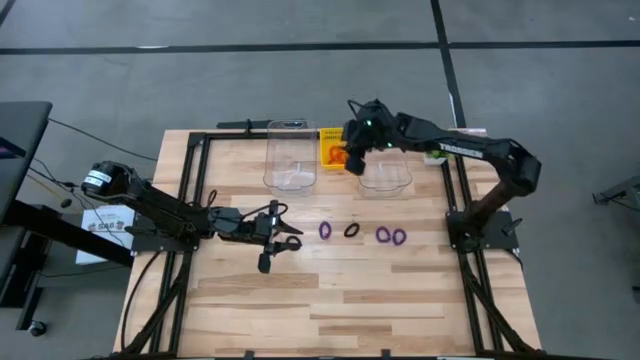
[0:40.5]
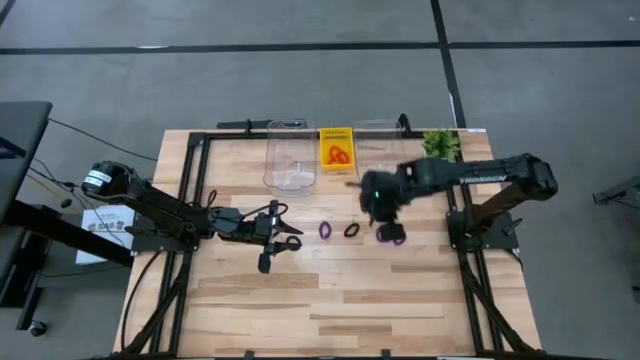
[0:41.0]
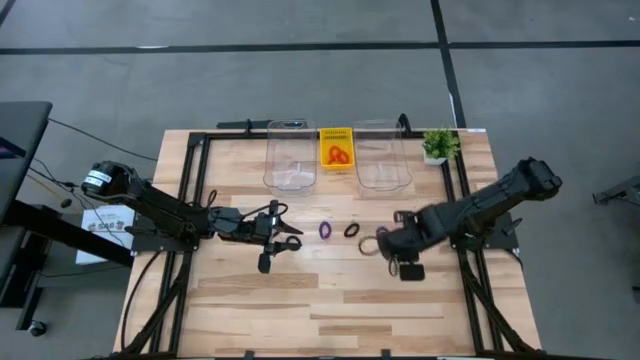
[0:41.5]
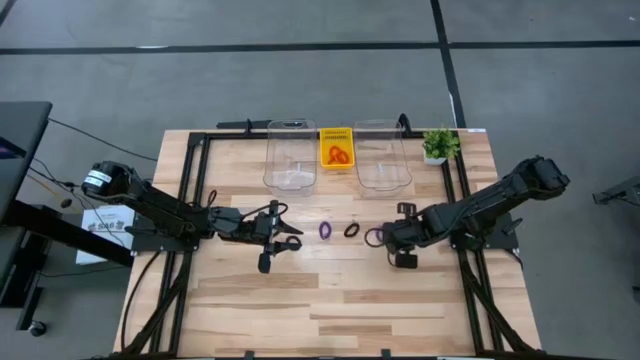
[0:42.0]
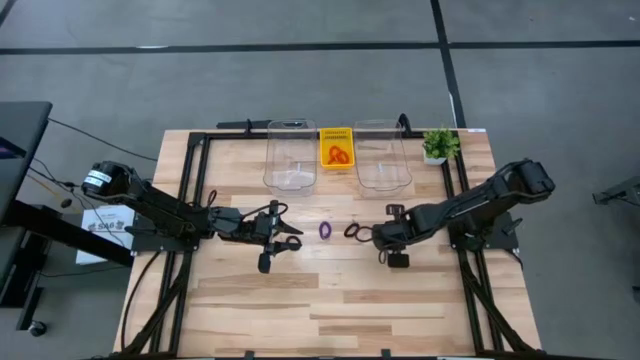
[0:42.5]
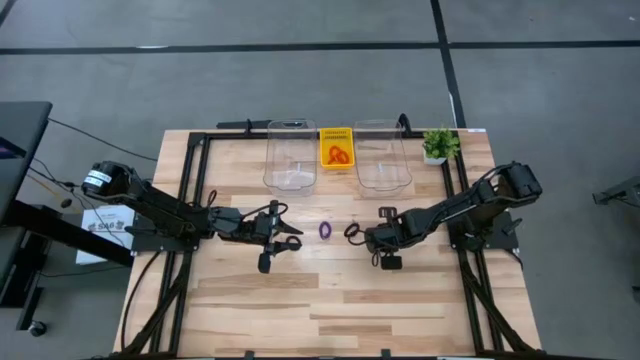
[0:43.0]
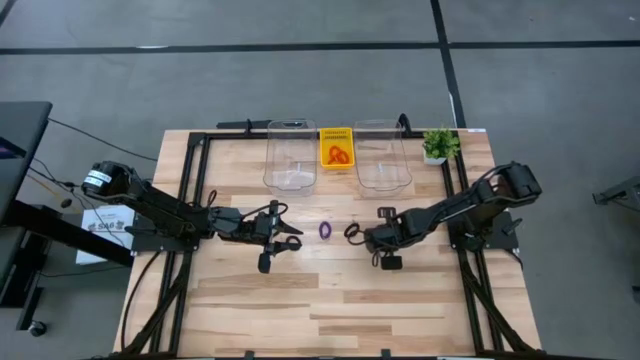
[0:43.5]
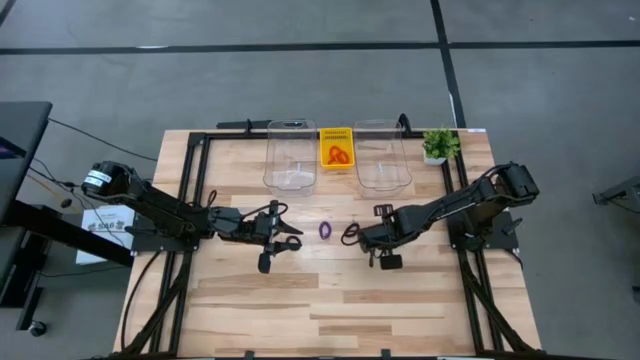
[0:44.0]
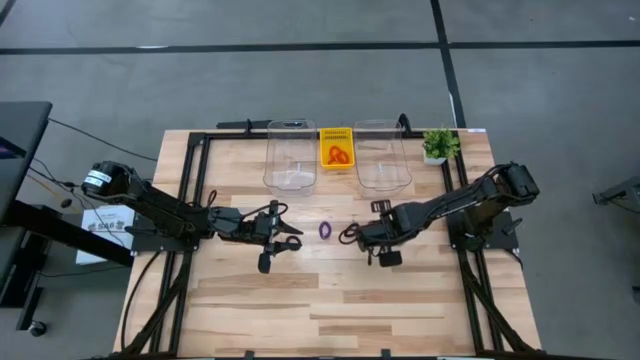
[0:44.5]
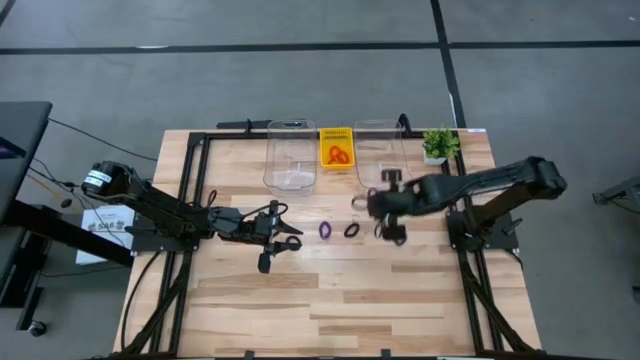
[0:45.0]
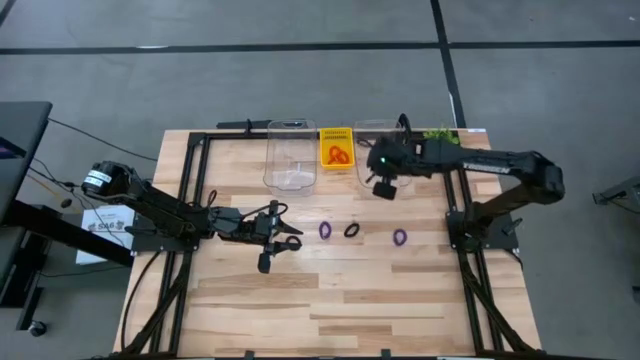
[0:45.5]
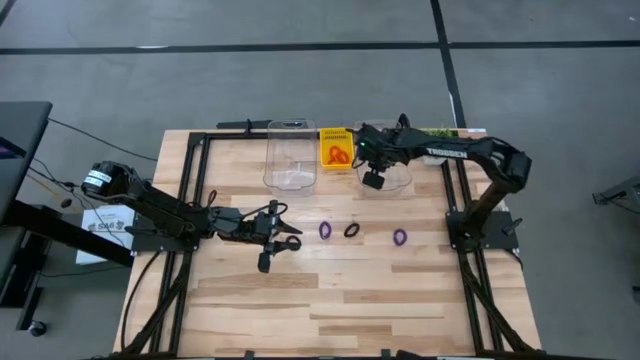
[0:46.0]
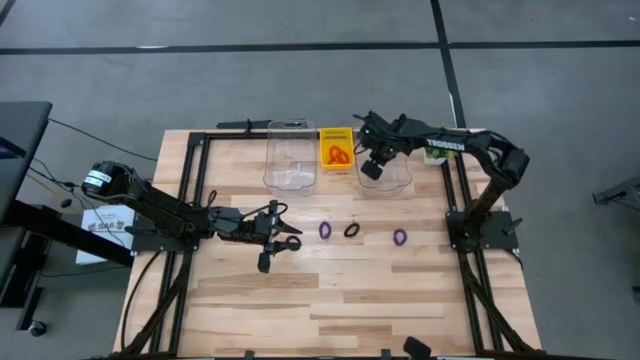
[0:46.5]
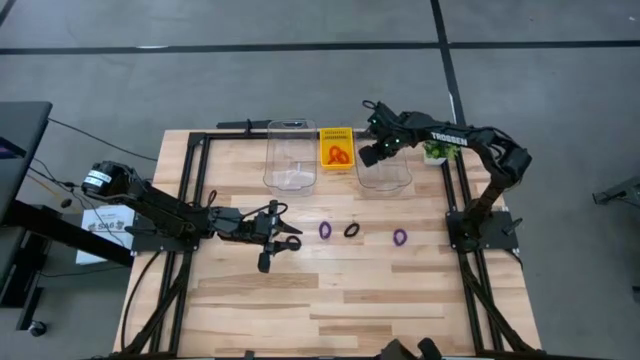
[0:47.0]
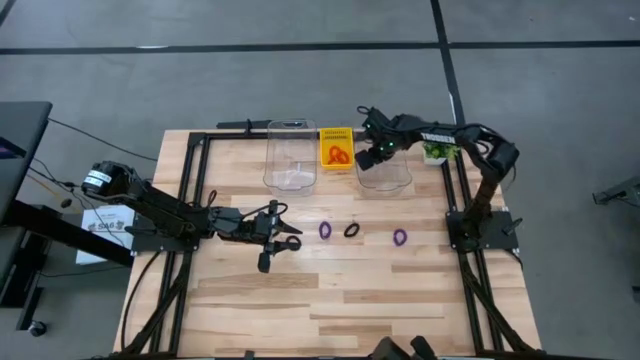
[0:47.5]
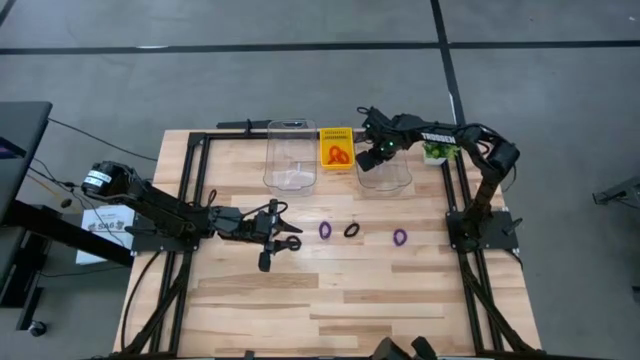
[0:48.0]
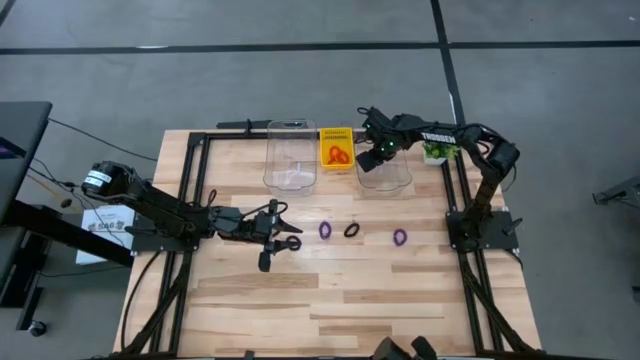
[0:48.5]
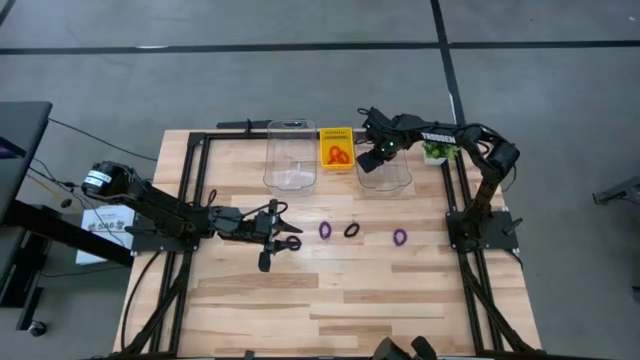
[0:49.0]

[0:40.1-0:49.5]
Task: Sort spring keychains
Put the middle purple spring keychain into the right transparent bin

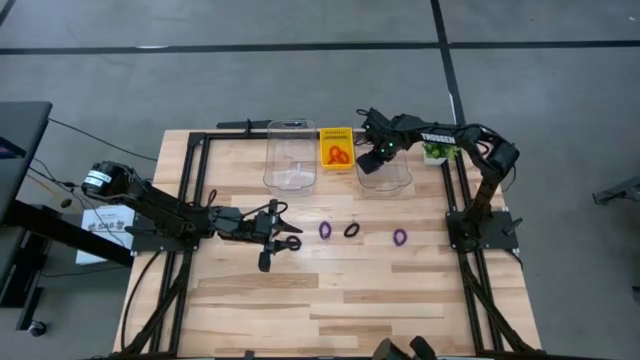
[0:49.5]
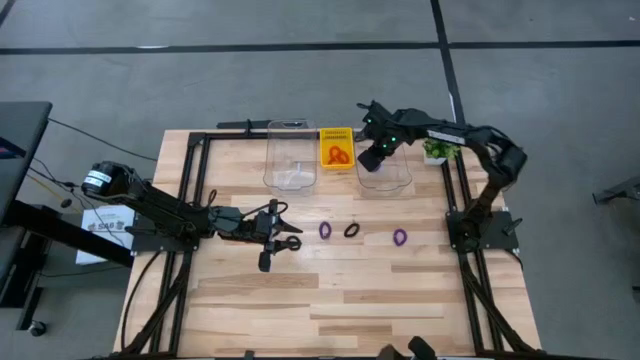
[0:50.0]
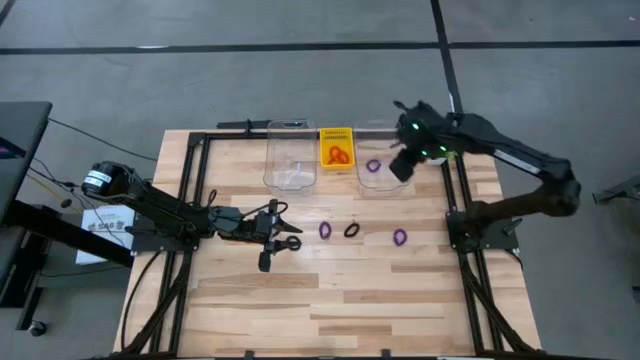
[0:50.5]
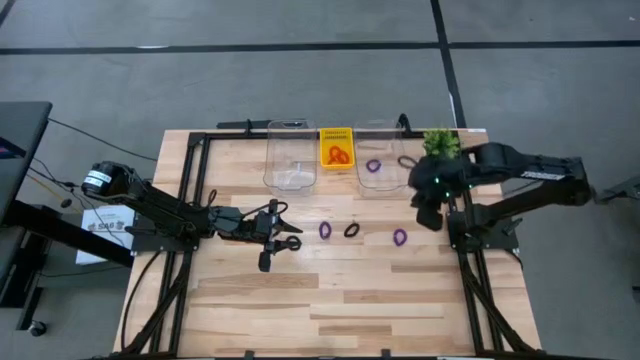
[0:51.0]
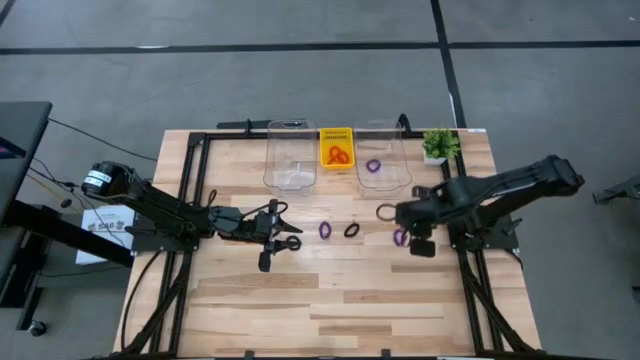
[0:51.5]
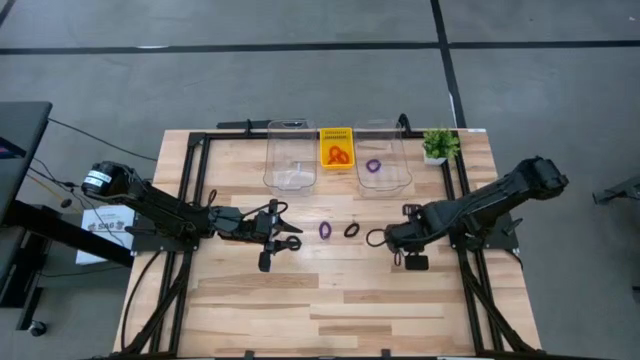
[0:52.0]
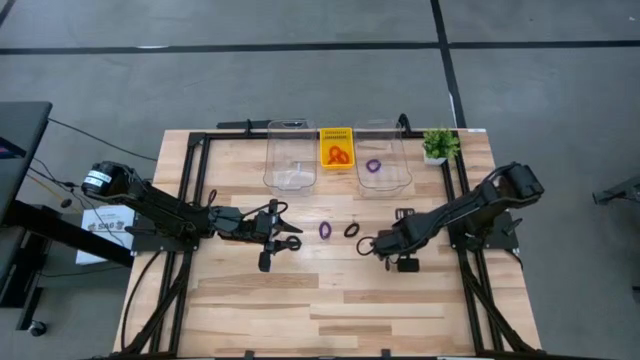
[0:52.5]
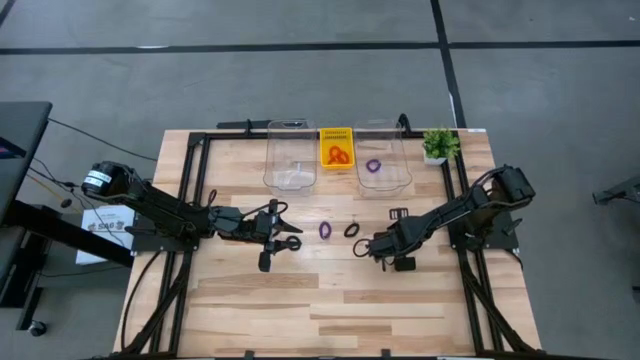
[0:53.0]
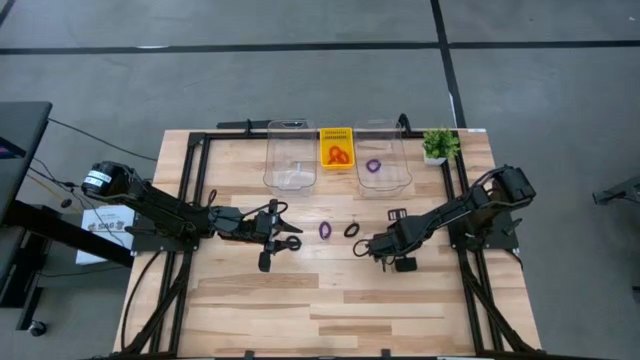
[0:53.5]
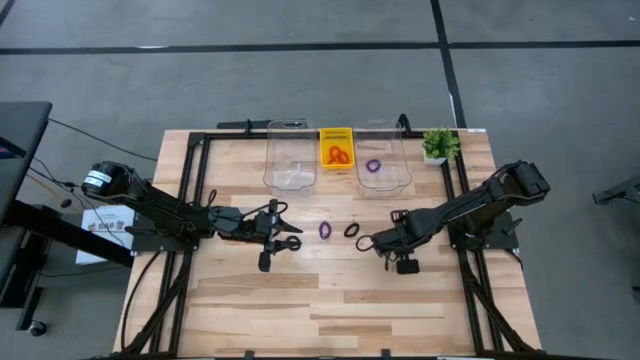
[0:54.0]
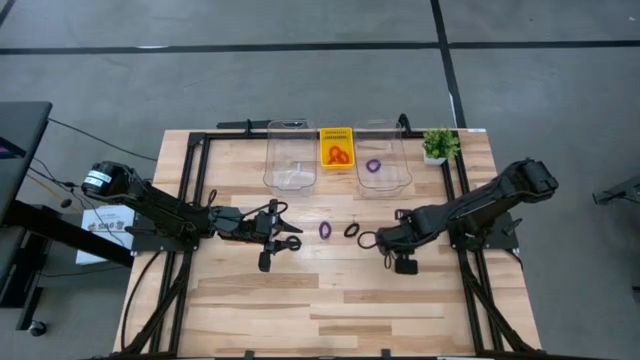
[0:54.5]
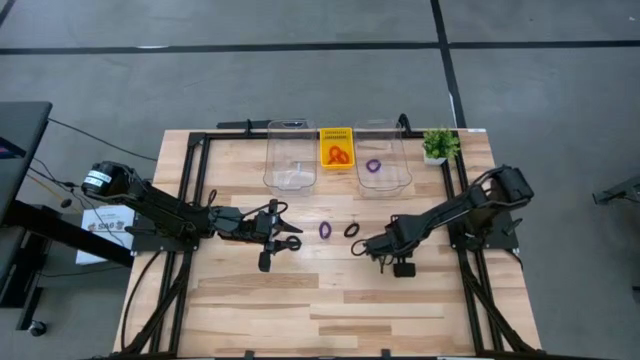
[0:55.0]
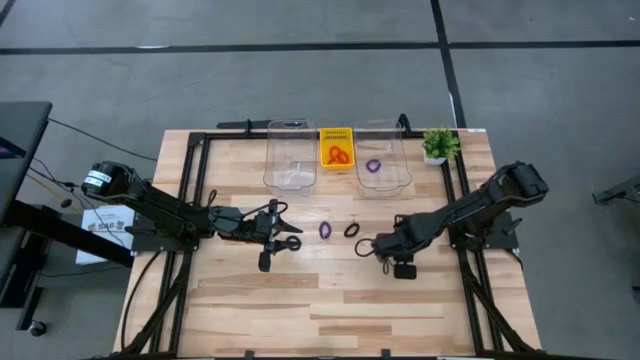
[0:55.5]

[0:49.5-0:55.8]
Put the right purple spring keychain into the right transparent bin

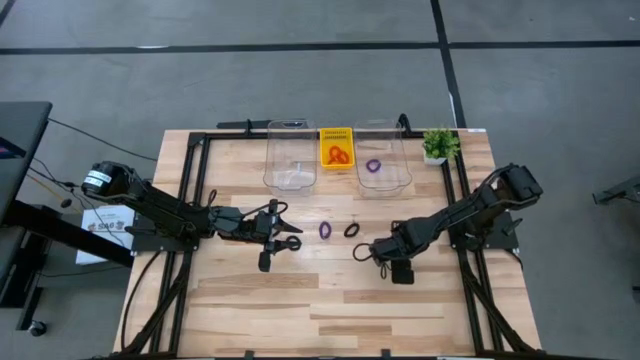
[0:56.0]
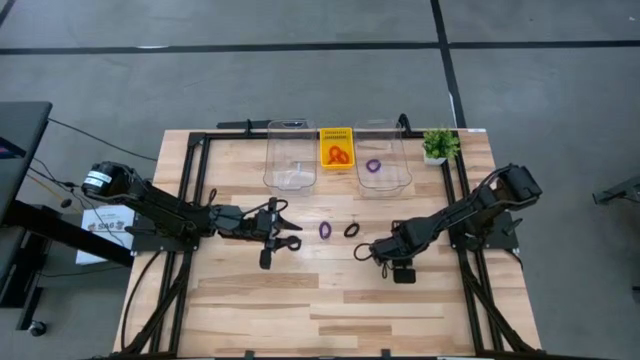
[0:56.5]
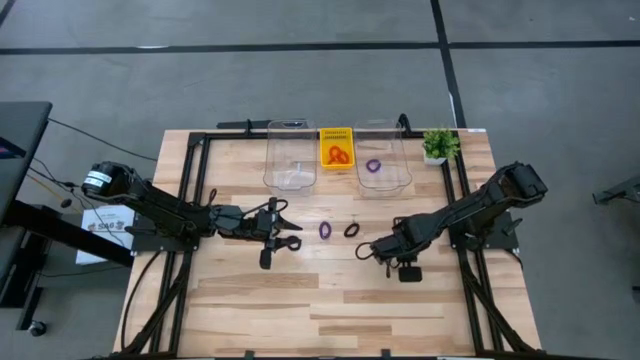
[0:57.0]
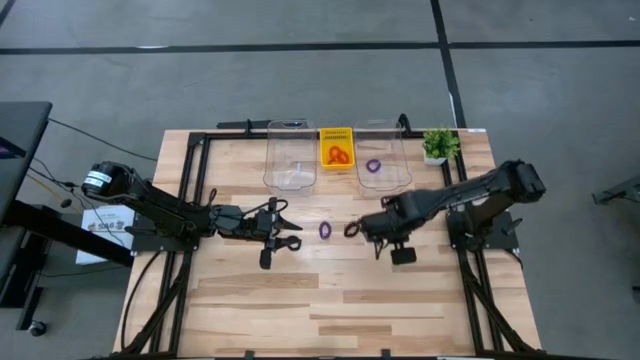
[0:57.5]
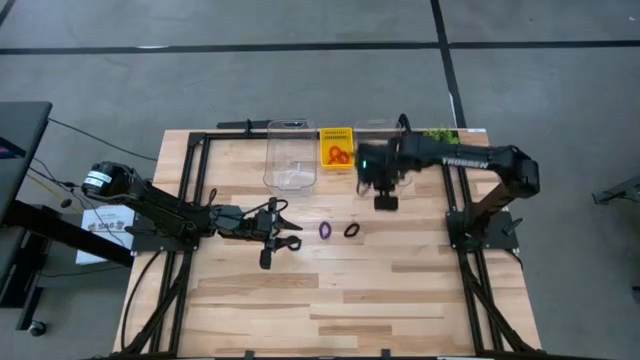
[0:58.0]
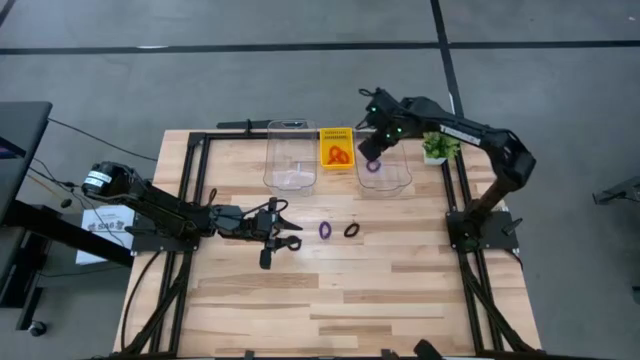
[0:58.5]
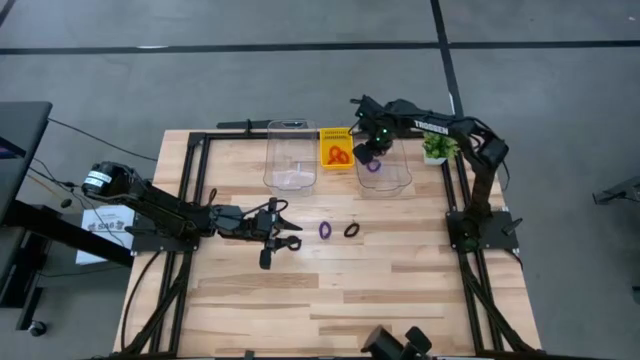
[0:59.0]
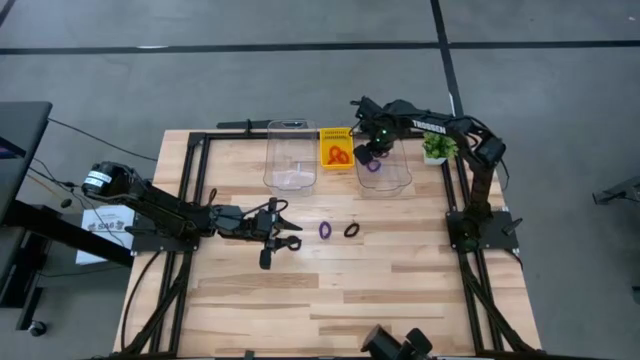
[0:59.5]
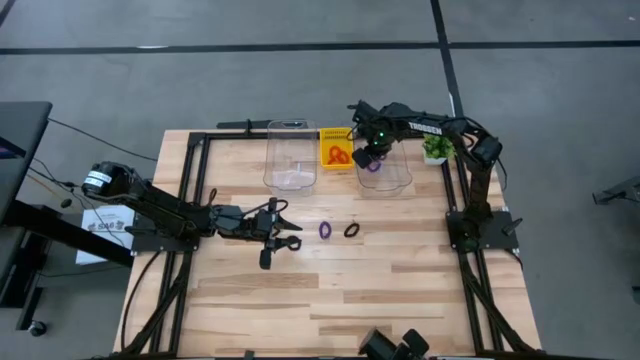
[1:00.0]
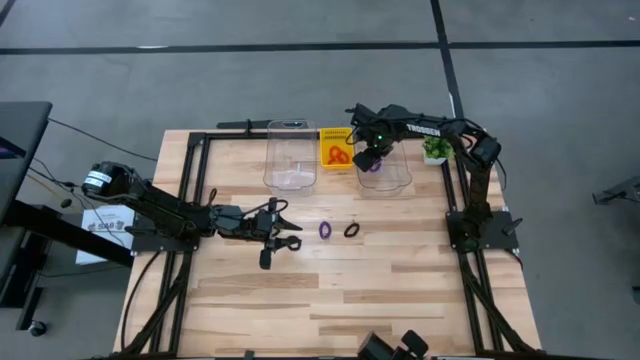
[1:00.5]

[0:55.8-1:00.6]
Put the right purple spring keychain into the right transparent bin

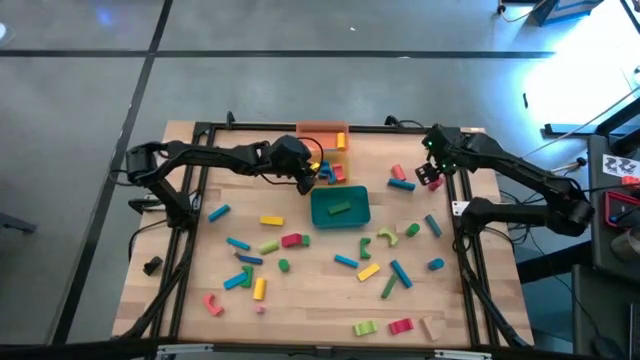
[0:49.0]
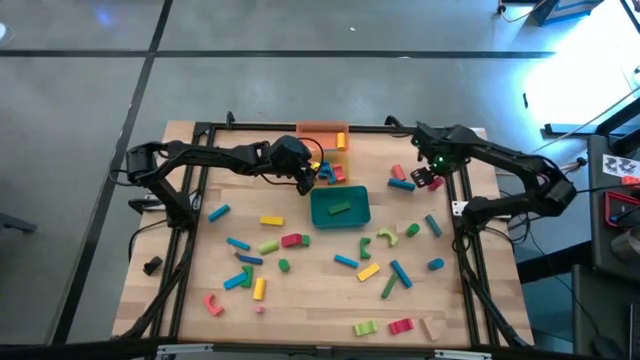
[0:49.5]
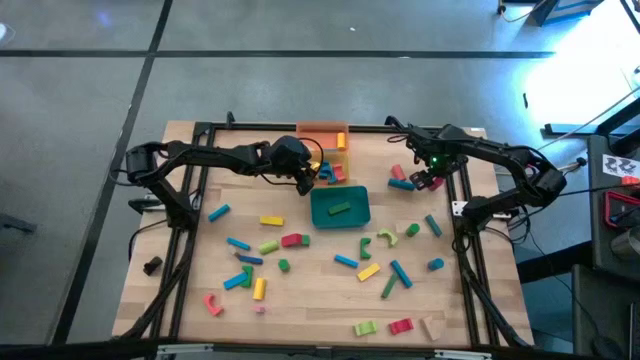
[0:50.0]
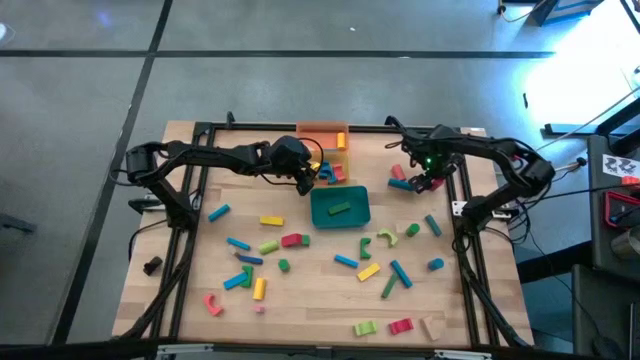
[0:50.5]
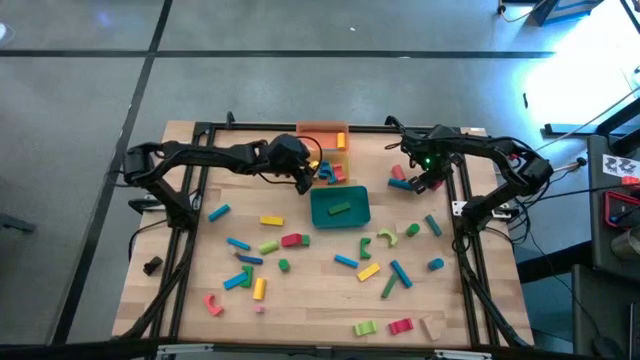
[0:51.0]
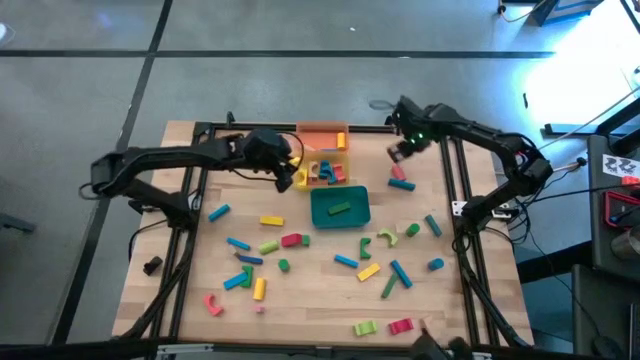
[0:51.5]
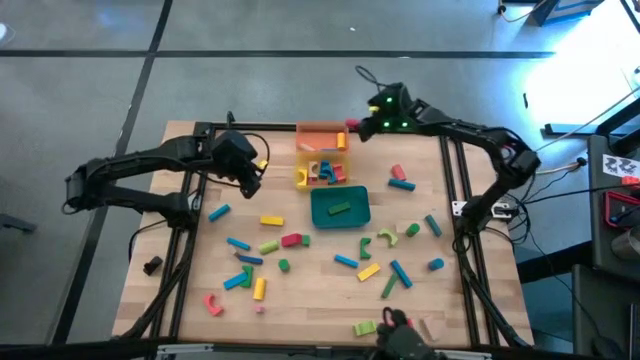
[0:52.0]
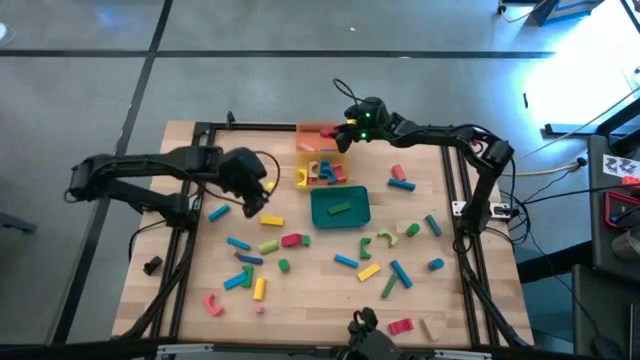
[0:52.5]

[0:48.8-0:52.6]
Task: Sort blocks by size
Put the red cylinder block into the orange bin
